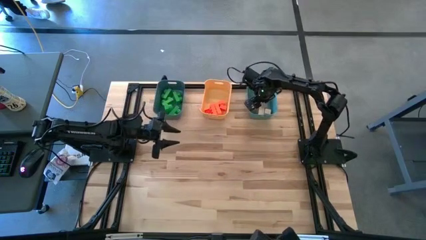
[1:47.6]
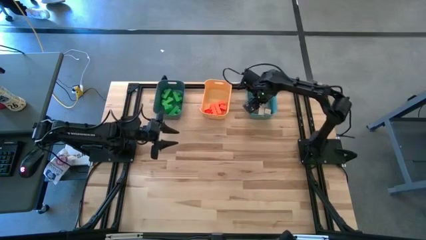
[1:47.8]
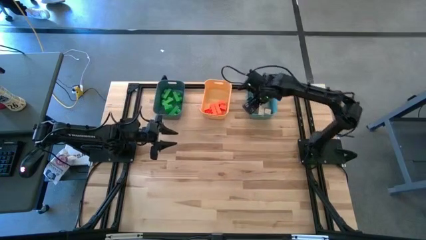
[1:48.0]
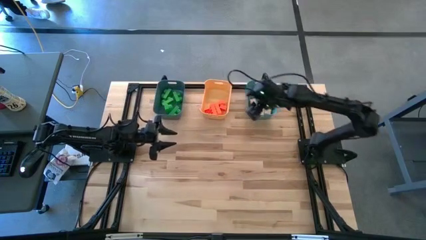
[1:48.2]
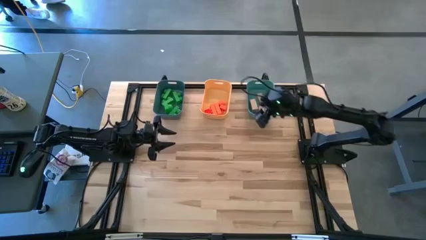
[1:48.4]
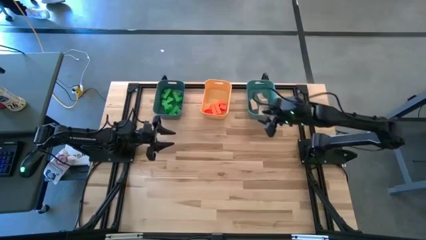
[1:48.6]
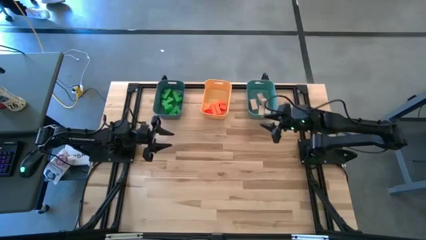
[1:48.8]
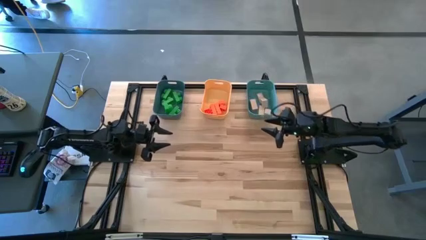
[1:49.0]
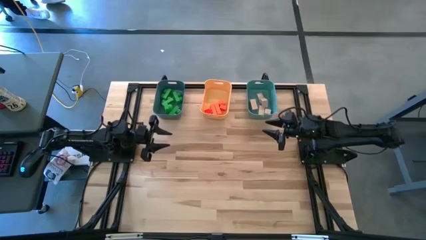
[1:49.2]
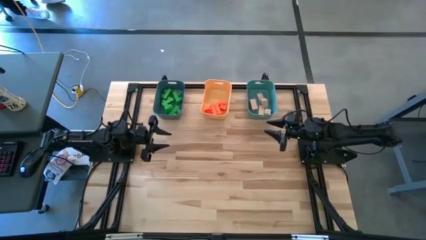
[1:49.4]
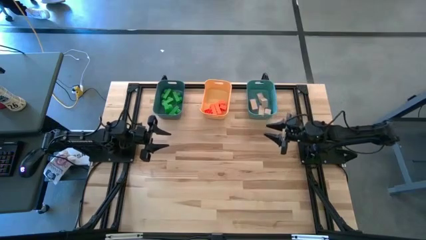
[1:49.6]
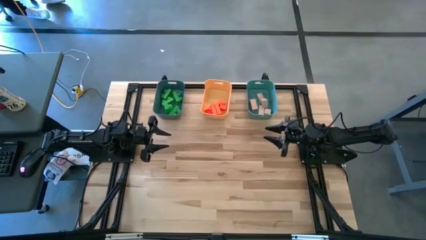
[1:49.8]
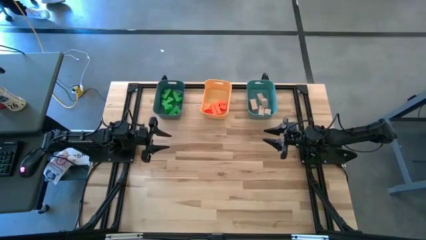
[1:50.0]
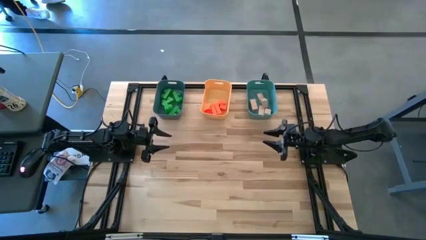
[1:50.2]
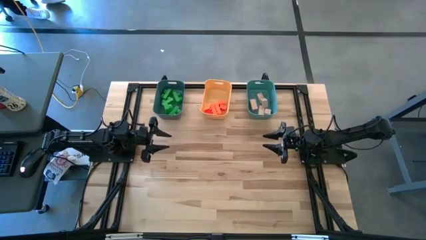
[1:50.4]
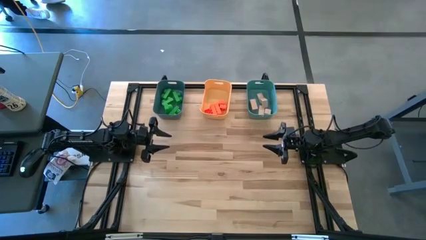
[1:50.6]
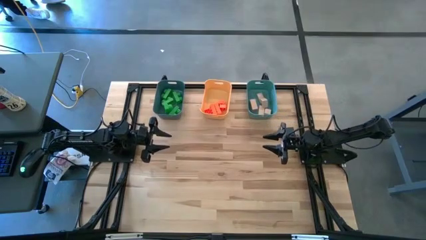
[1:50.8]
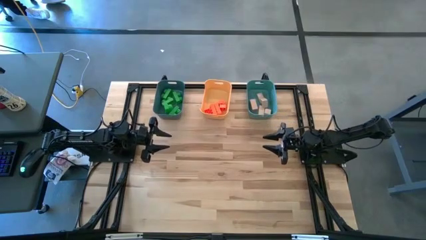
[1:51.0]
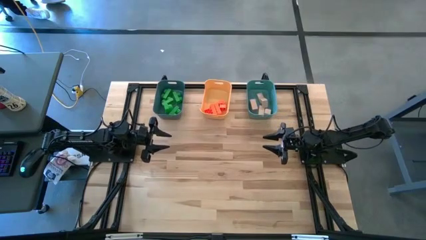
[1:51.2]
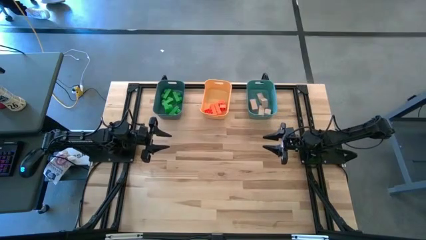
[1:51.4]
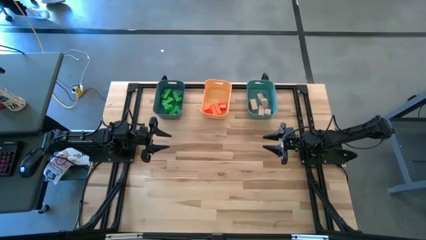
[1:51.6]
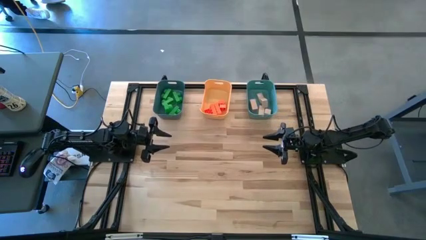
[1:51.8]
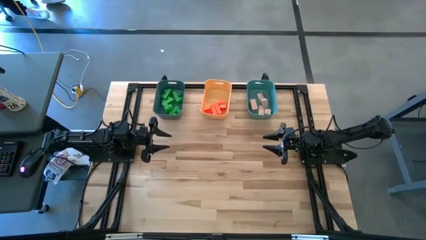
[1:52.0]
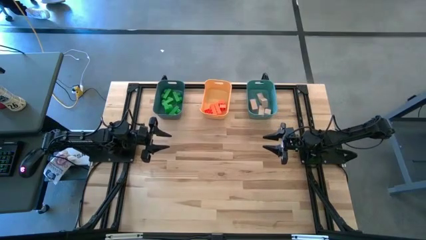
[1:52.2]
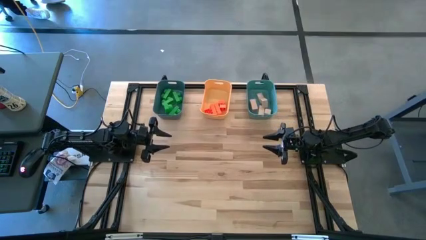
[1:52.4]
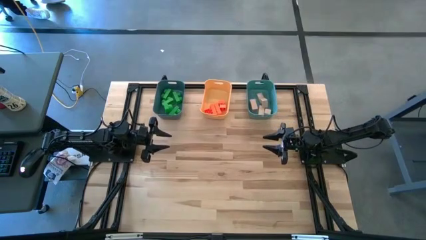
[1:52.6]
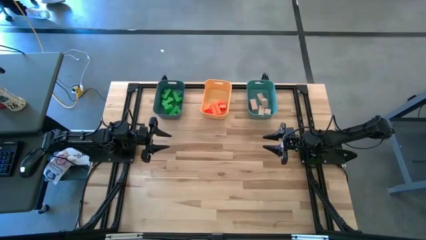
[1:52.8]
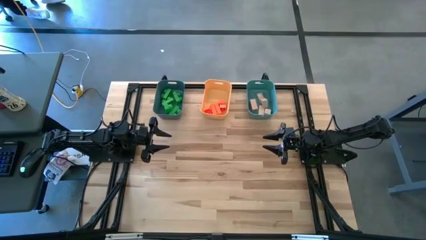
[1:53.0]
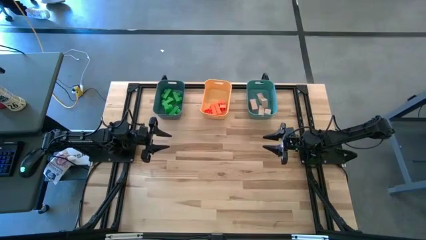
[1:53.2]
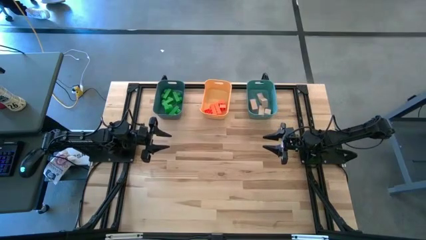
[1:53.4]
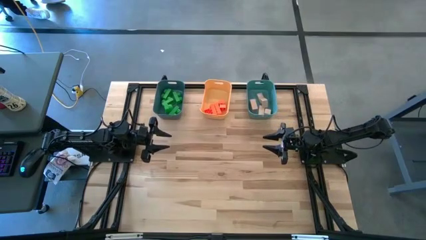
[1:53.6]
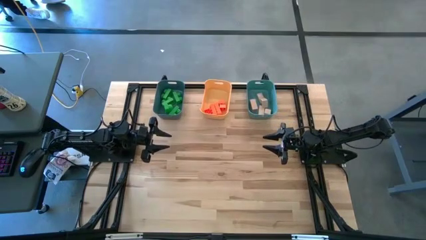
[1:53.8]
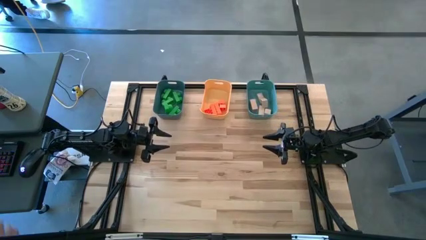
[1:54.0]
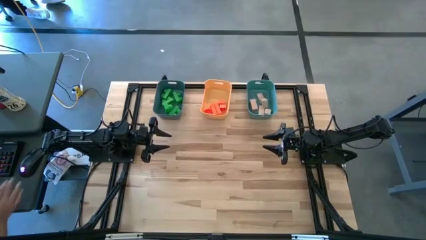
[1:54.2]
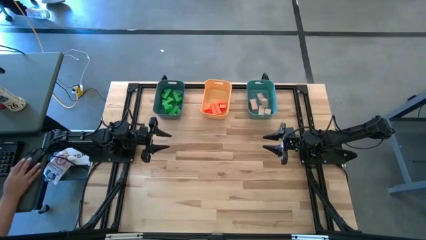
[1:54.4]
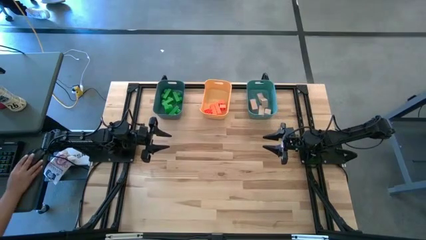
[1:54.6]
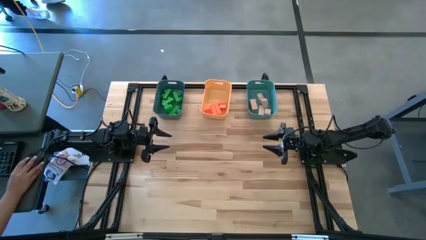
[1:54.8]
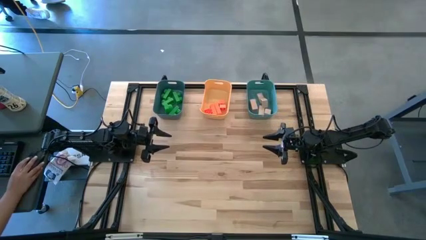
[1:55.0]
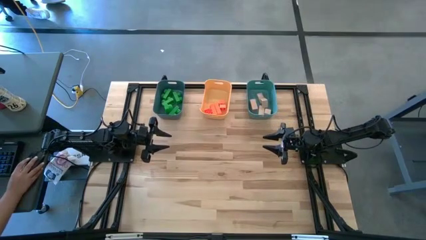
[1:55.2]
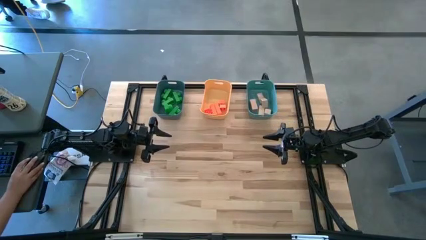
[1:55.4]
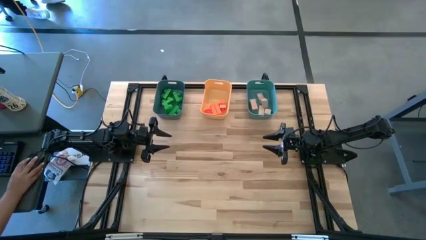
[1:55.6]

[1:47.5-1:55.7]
Task: Sort & place blocks by color
Return to Home Position

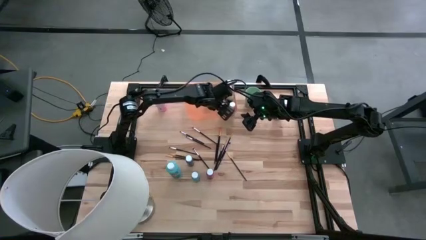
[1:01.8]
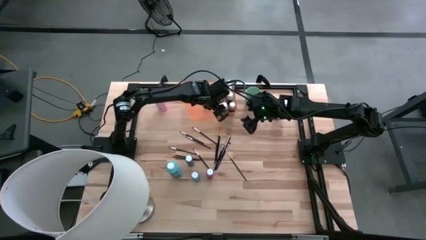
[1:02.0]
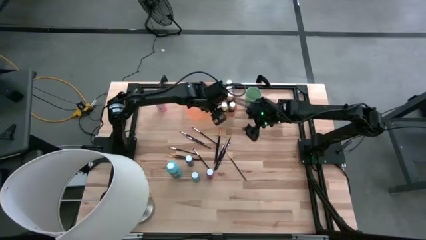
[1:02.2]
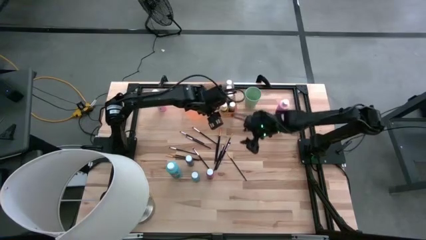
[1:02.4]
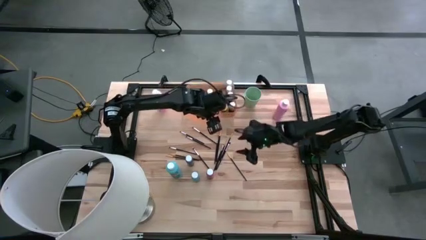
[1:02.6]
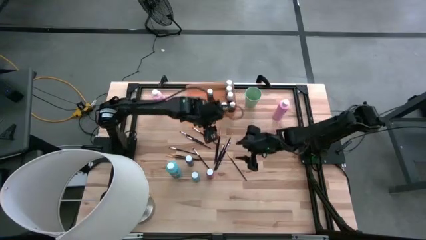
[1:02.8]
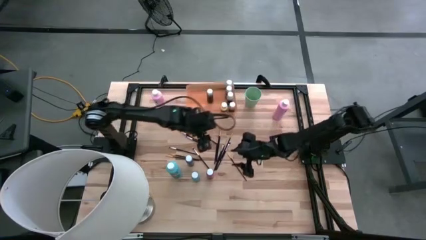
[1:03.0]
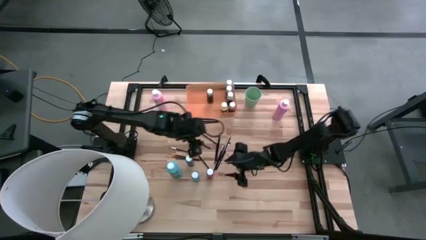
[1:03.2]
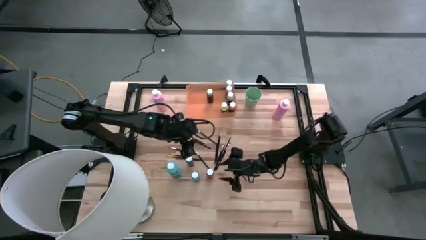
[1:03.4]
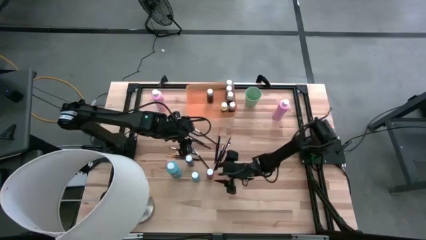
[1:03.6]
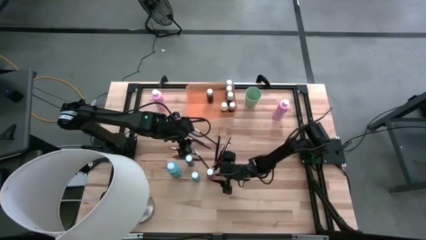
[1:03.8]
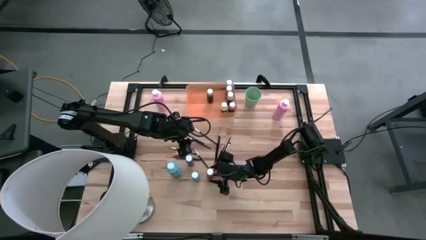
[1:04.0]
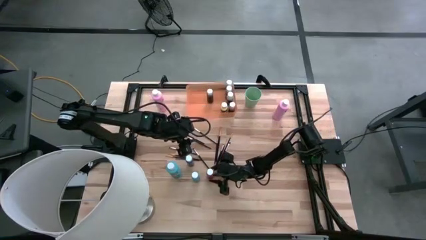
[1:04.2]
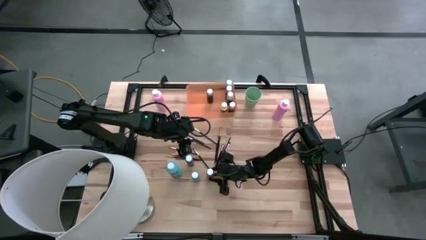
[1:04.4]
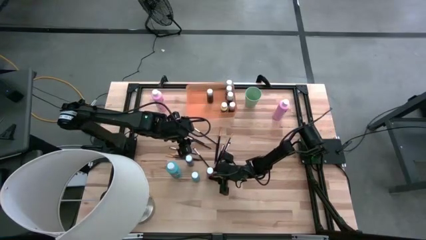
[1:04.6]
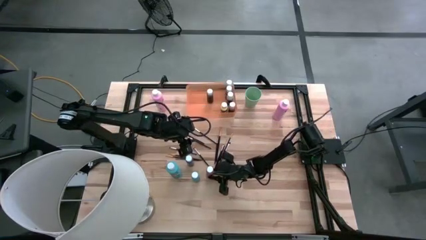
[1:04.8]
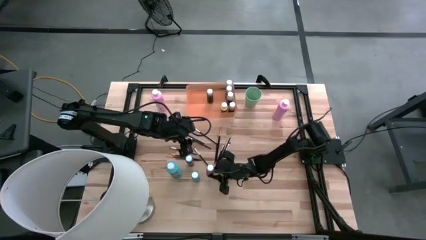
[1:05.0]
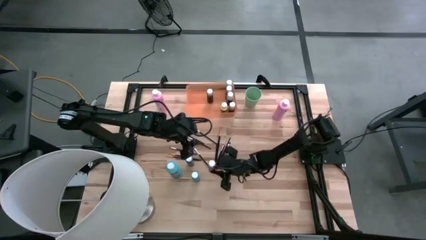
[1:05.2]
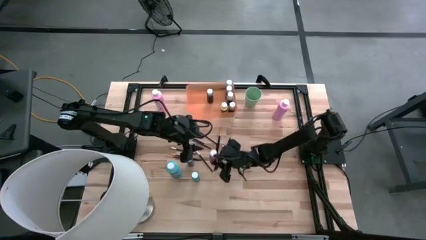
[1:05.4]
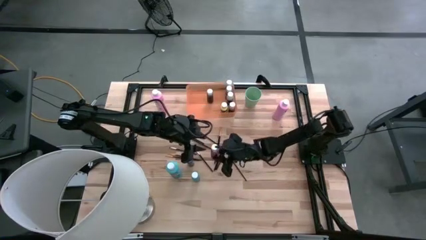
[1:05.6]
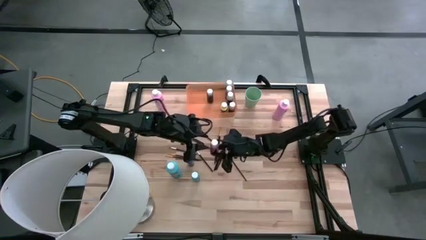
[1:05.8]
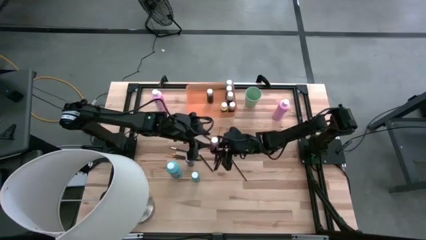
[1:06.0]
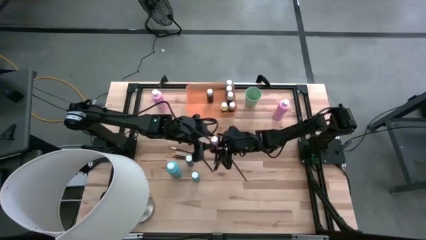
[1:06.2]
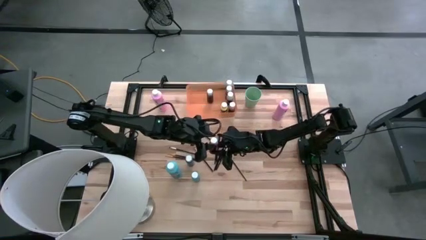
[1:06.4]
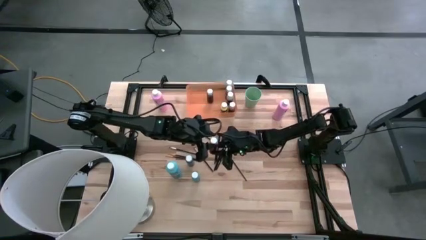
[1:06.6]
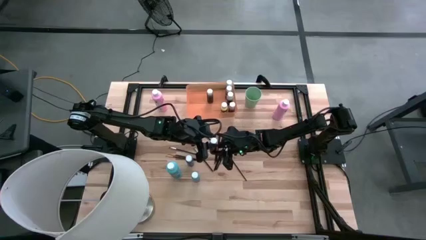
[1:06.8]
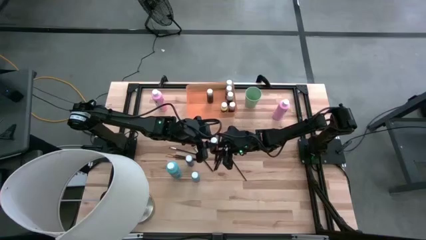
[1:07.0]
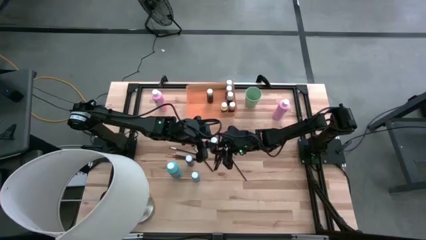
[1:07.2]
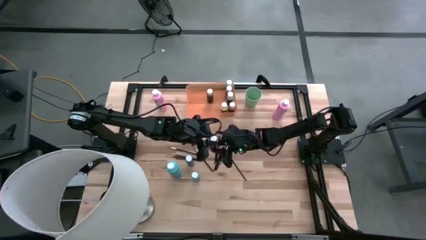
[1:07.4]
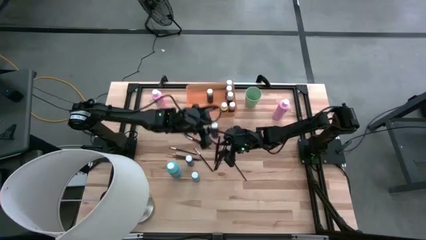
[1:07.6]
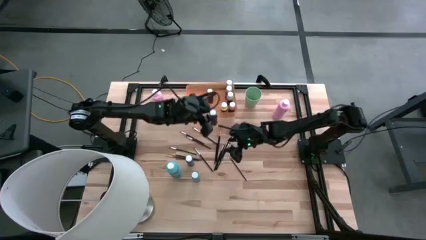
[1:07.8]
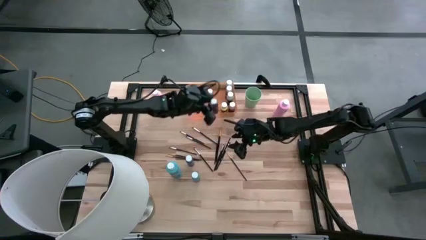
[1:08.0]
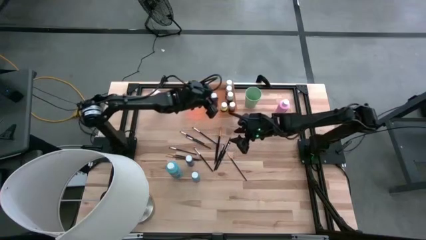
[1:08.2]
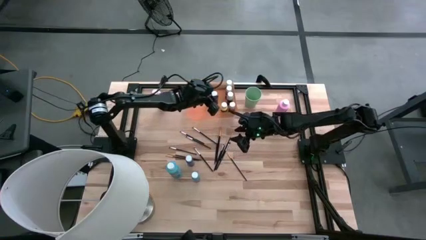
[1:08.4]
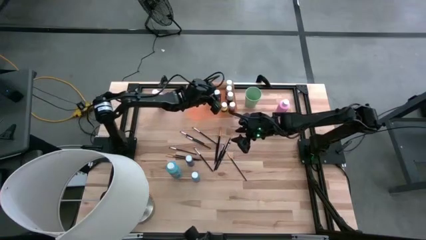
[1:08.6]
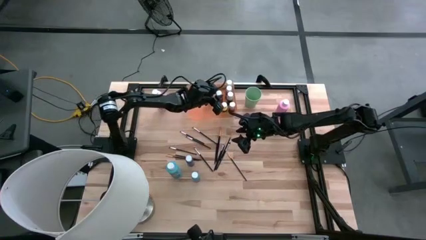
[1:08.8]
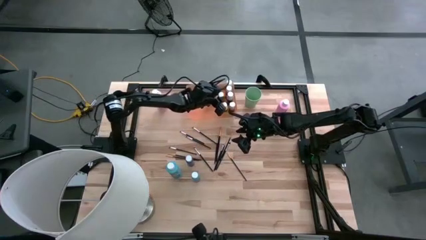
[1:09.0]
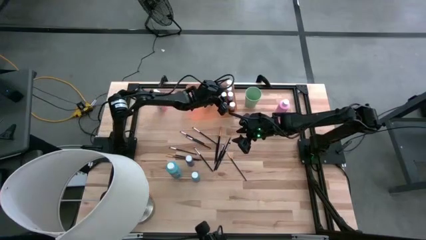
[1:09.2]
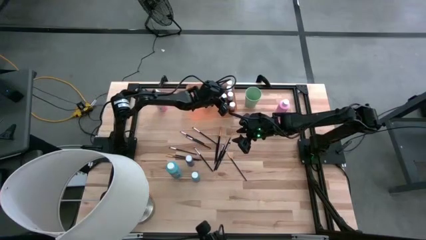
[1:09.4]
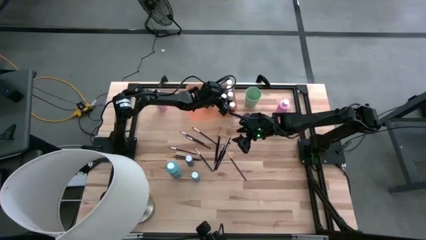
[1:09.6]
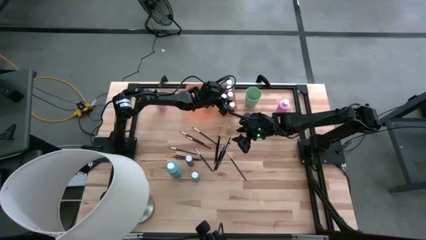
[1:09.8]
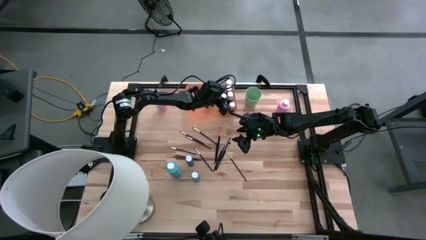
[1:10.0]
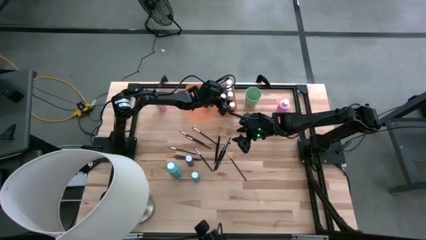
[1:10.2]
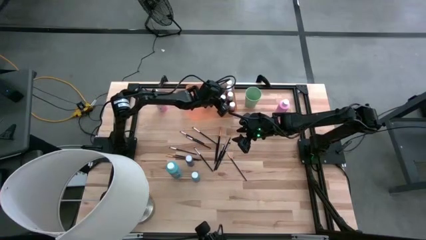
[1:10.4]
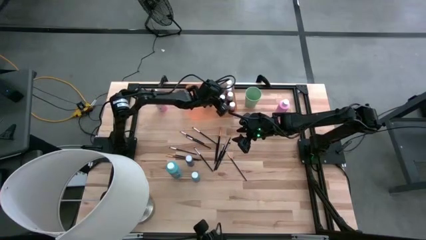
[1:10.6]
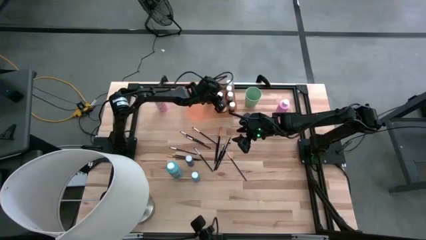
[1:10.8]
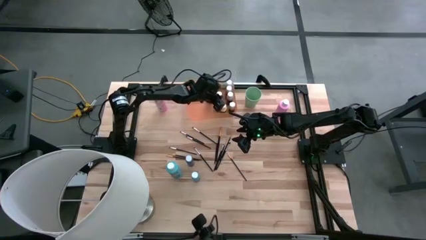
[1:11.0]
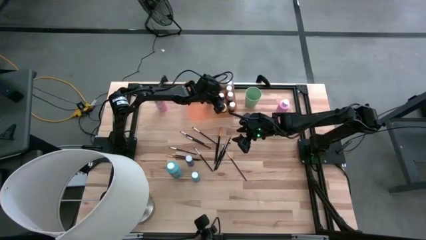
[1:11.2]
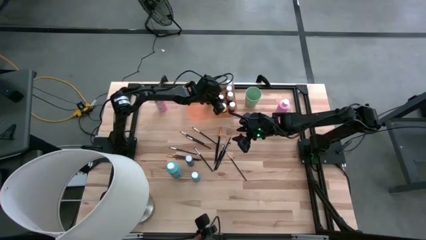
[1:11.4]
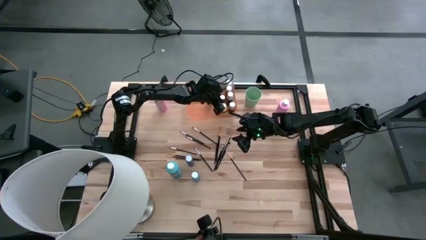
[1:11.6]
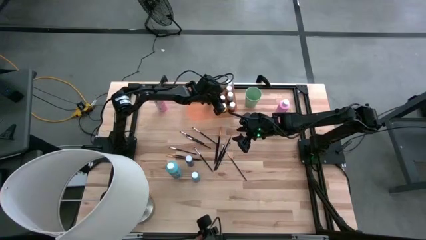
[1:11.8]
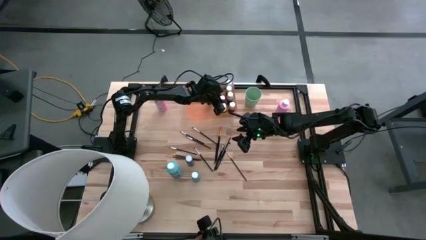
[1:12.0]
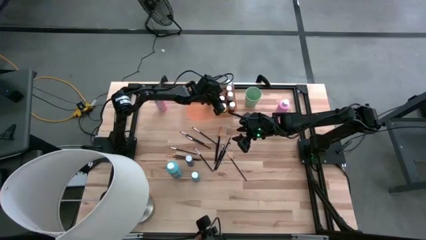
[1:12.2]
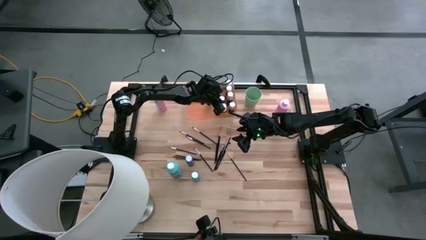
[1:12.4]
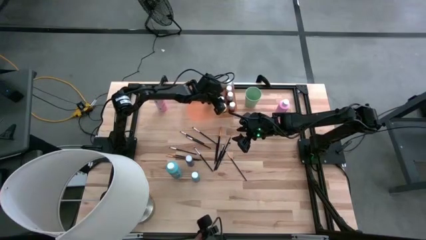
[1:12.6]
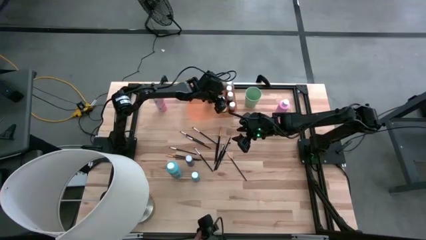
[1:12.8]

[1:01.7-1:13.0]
Task: Pick & Place Paint Supplies
Put the small pink paint bottle into the orange bin
